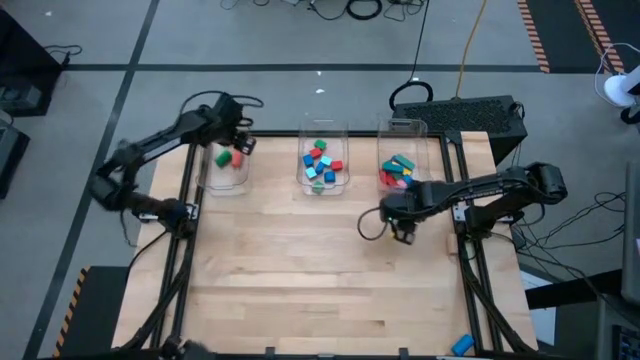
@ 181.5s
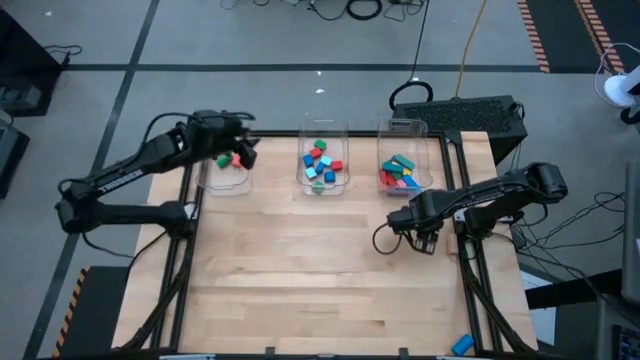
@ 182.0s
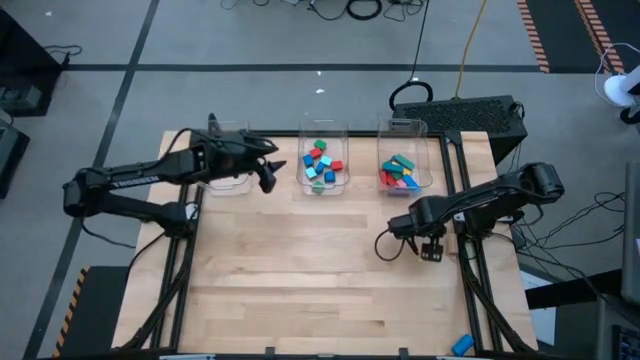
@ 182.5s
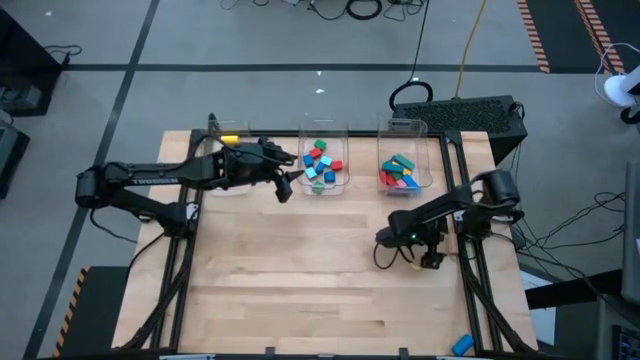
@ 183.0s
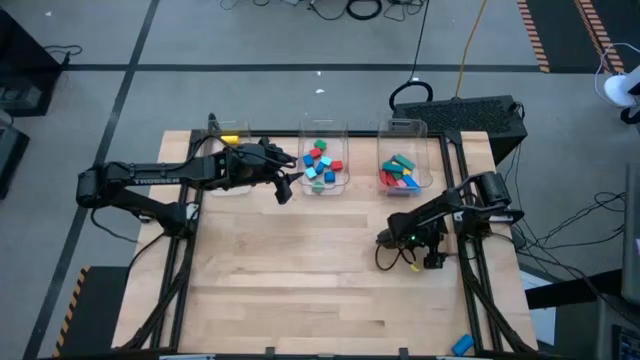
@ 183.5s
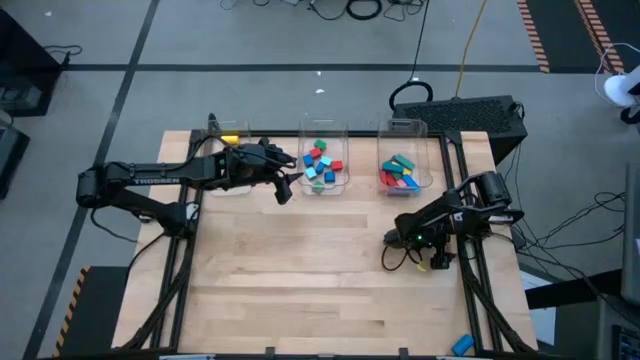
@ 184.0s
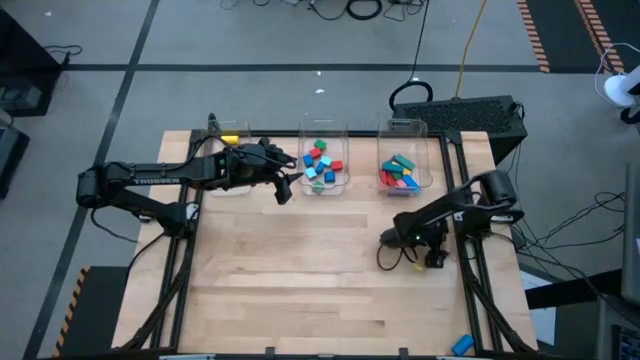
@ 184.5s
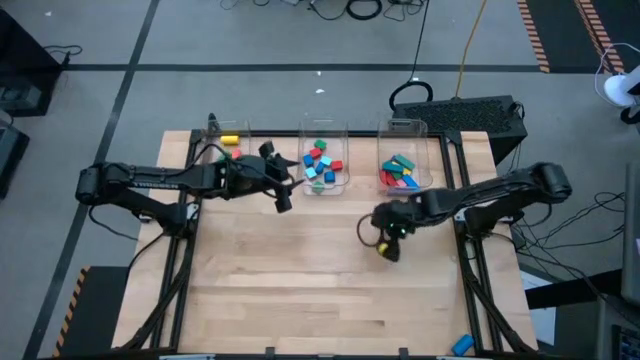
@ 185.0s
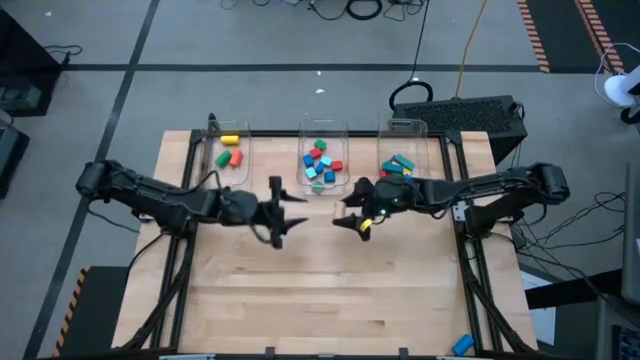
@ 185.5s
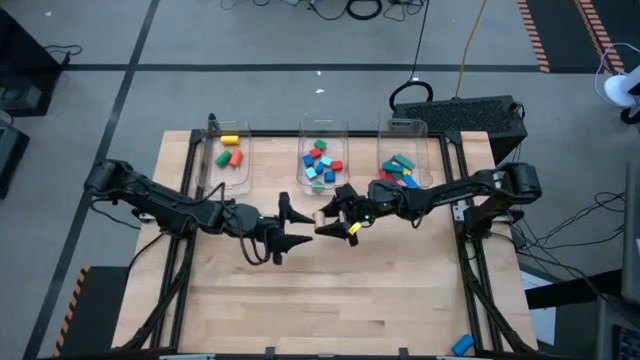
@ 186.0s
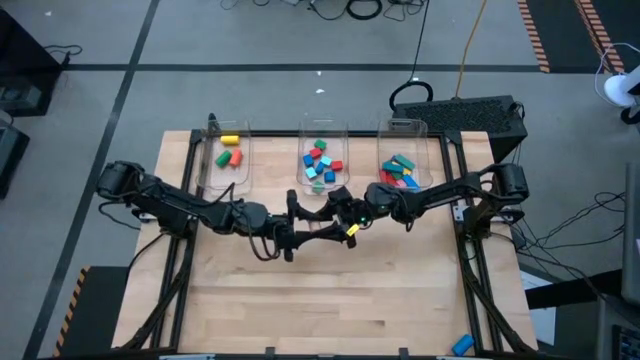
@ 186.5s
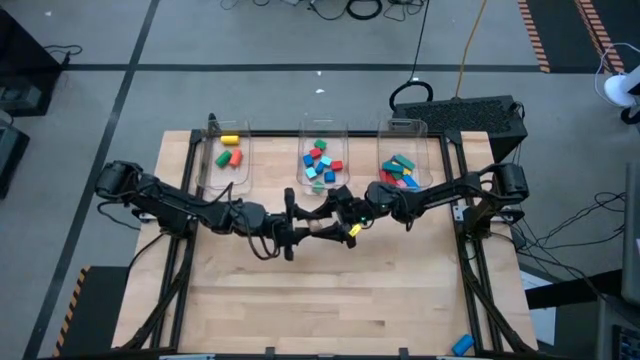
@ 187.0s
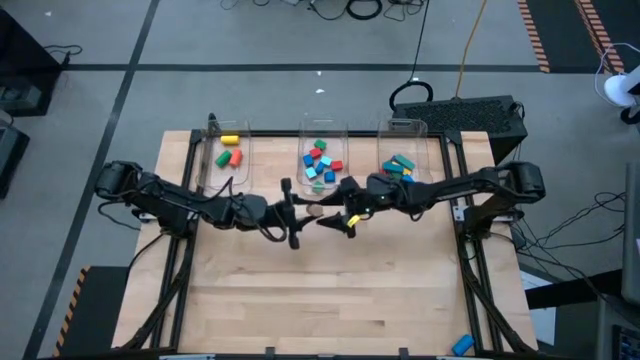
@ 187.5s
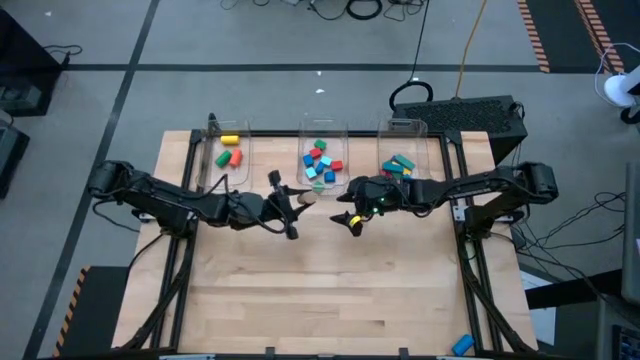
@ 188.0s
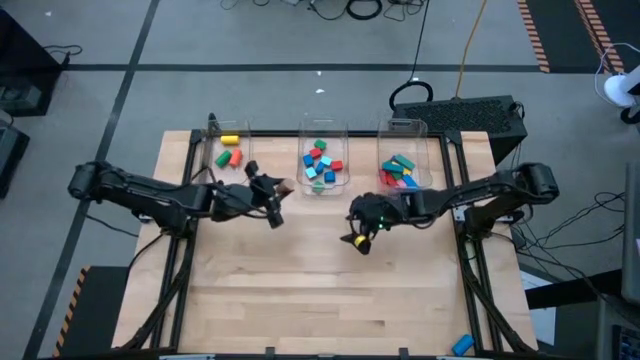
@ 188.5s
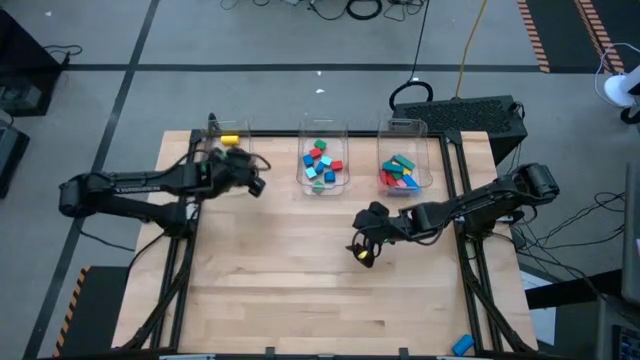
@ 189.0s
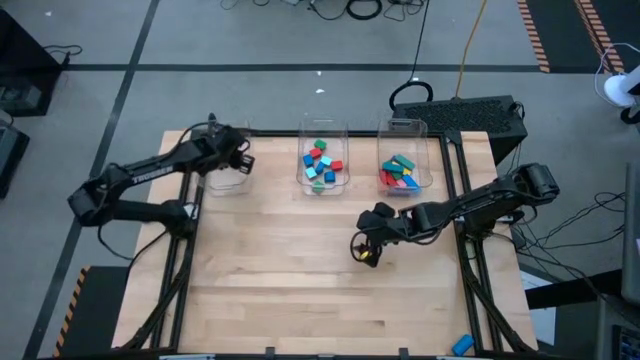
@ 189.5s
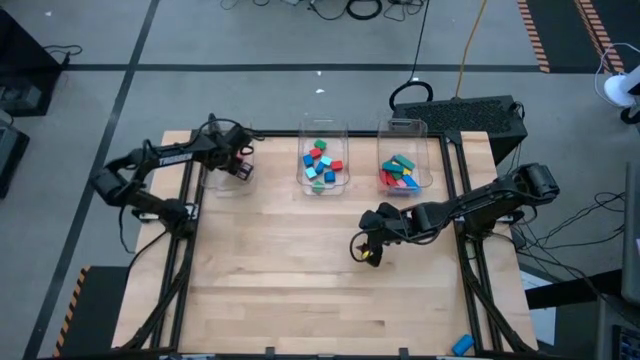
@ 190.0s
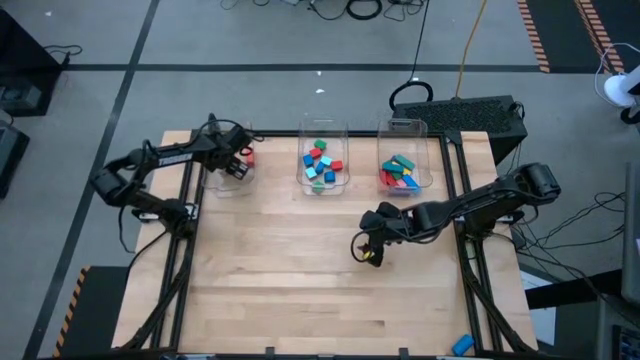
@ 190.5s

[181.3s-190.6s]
Task: Sort blocks by size
Put the brown cylindrical block into the left transparent bin

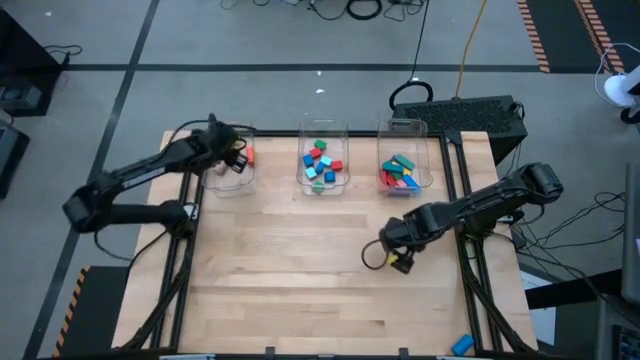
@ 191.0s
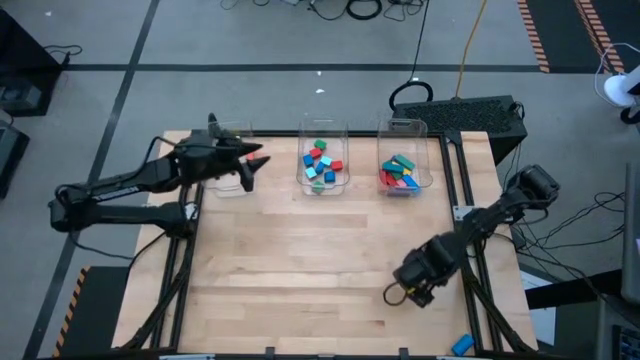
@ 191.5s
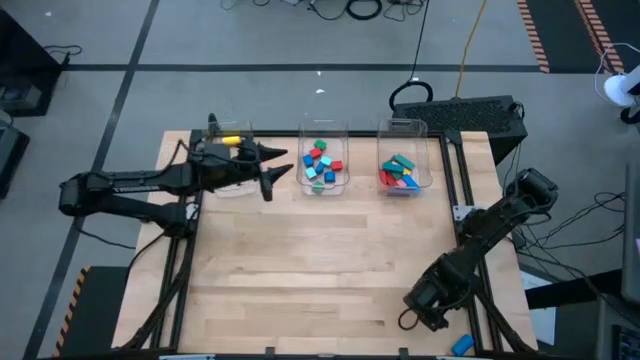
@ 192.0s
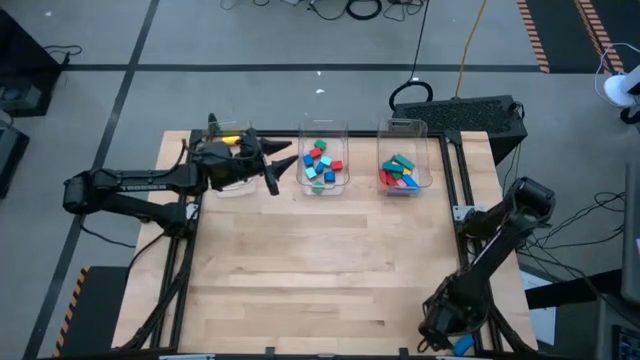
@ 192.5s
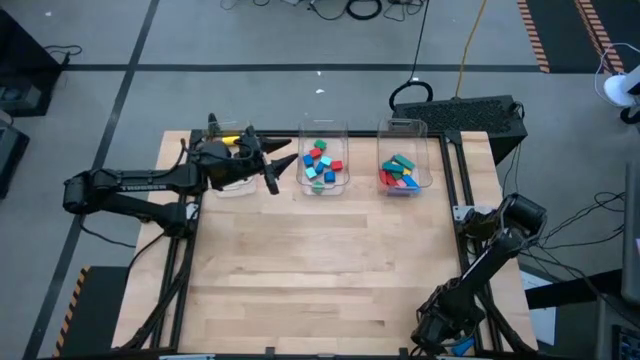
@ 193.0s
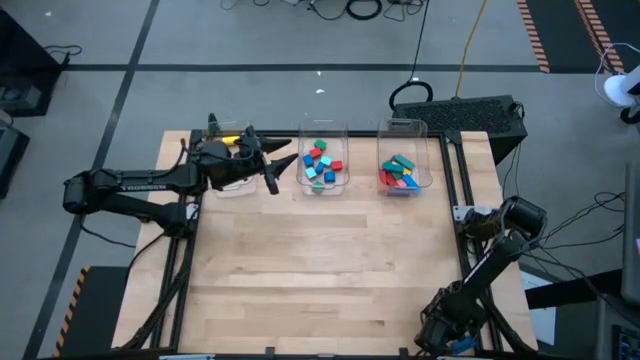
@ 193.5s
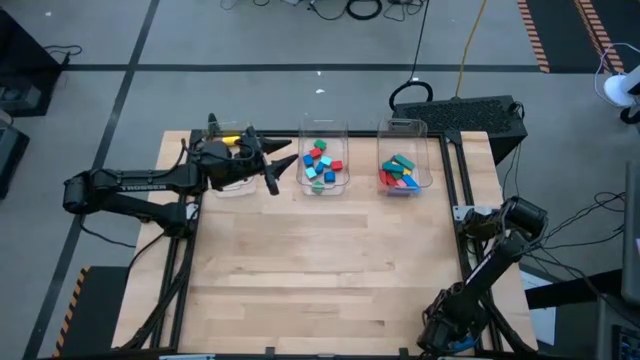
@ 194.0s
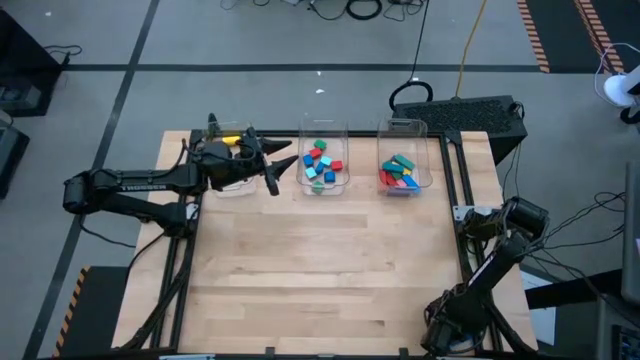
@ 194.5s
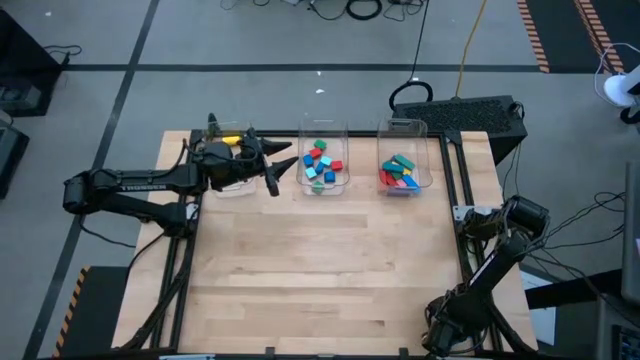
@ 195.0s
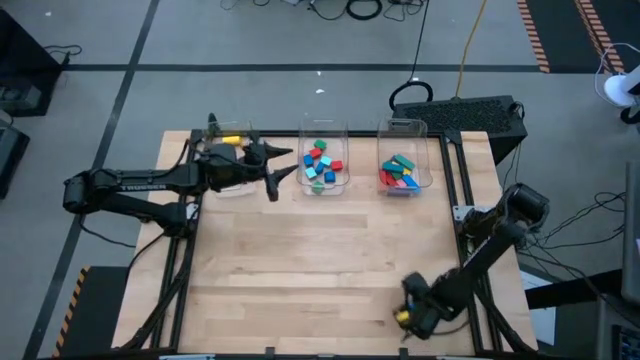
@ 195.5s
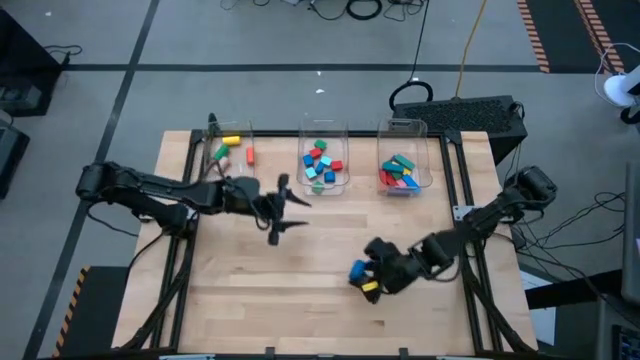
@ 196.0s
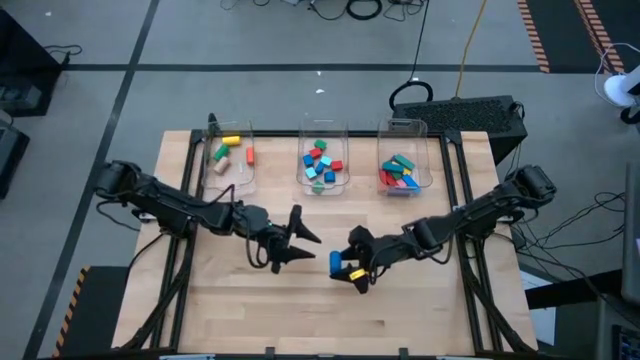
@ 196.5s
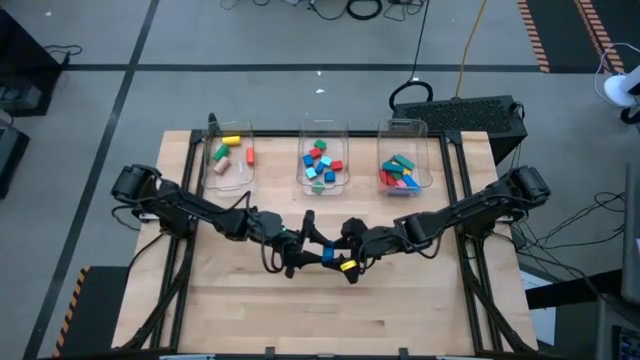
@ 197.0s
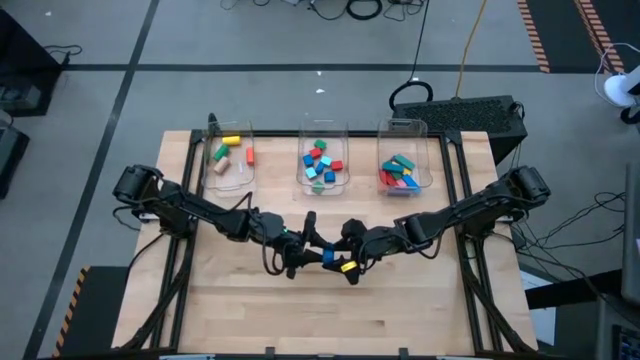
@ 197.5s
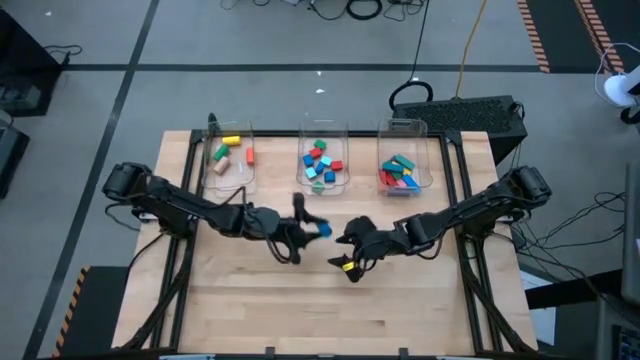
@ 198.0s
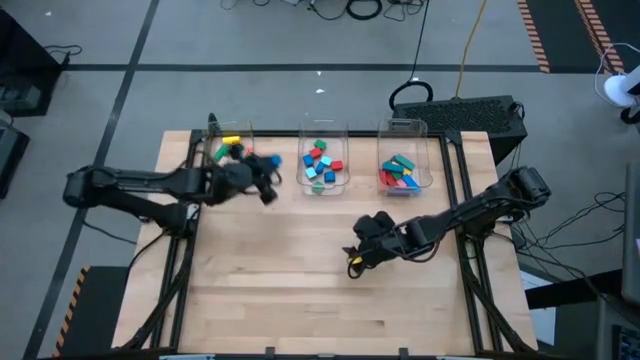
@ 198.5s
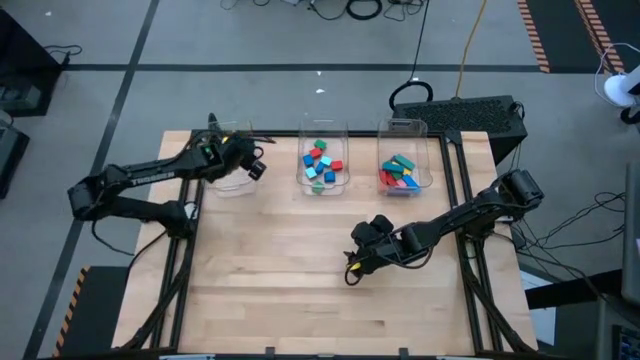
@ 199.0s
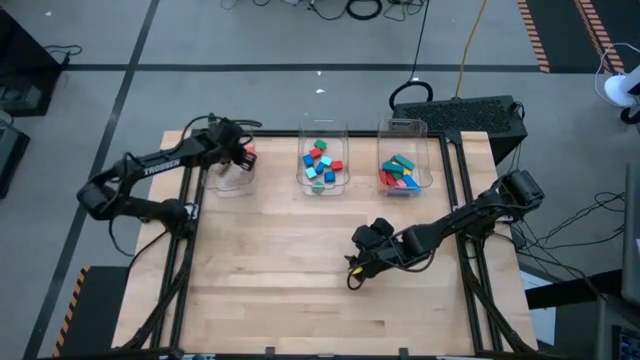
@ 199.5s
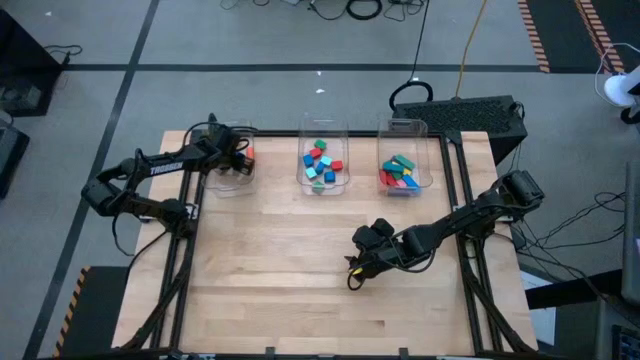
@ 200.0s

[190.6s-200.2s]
Put the blue cylindrical block into the left transparent bin

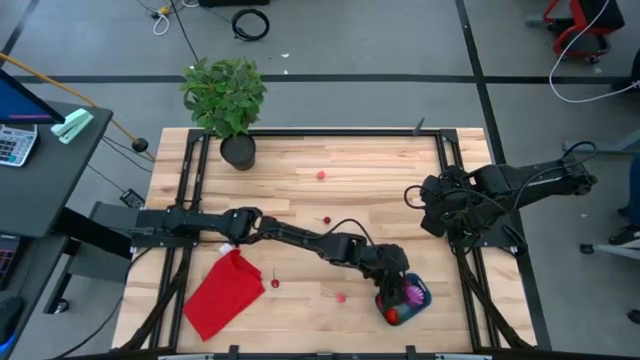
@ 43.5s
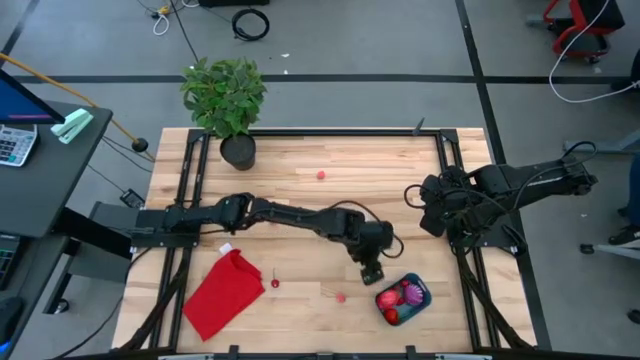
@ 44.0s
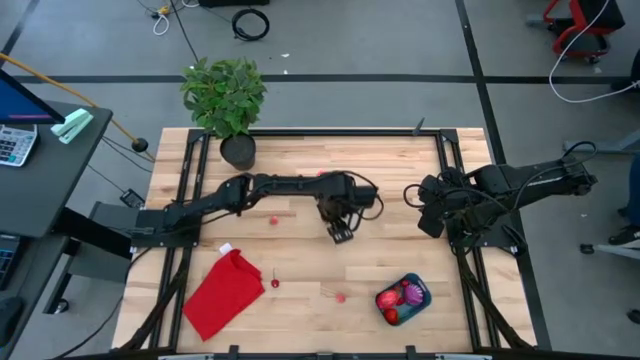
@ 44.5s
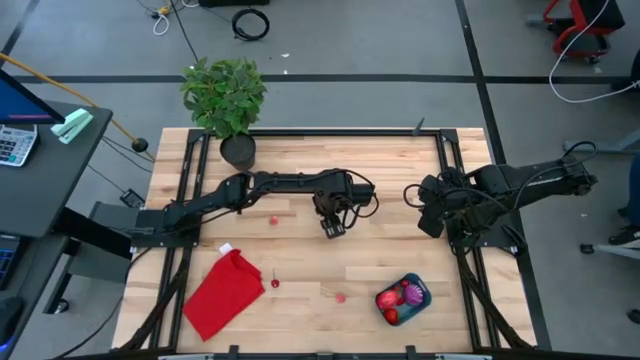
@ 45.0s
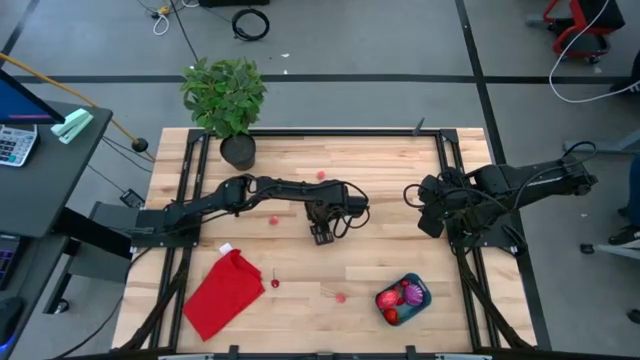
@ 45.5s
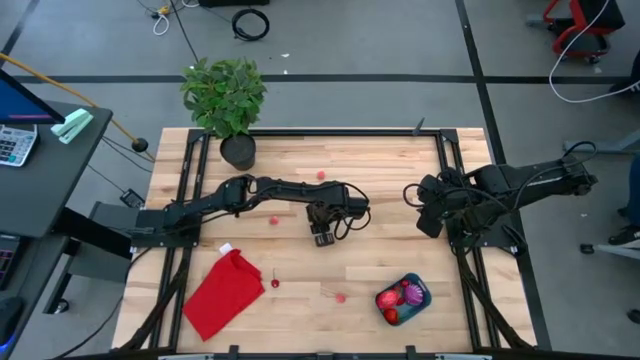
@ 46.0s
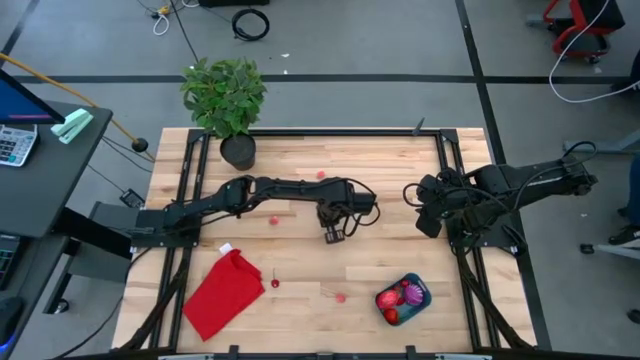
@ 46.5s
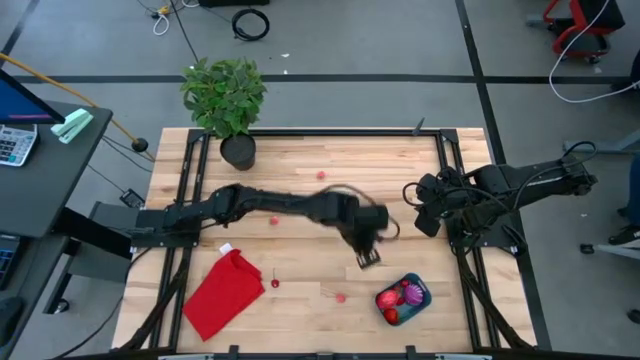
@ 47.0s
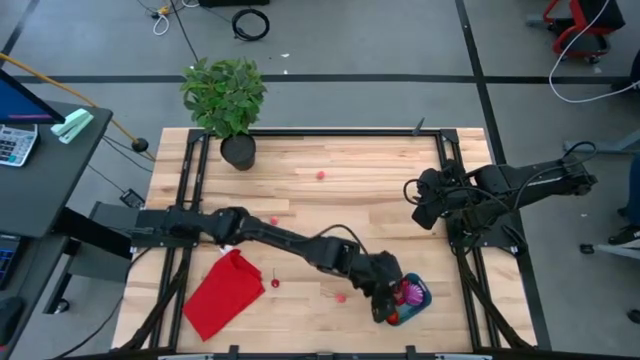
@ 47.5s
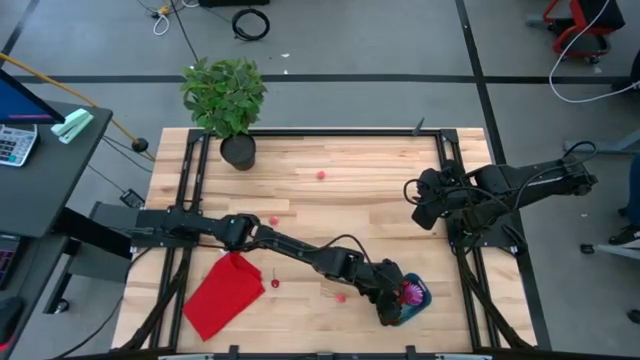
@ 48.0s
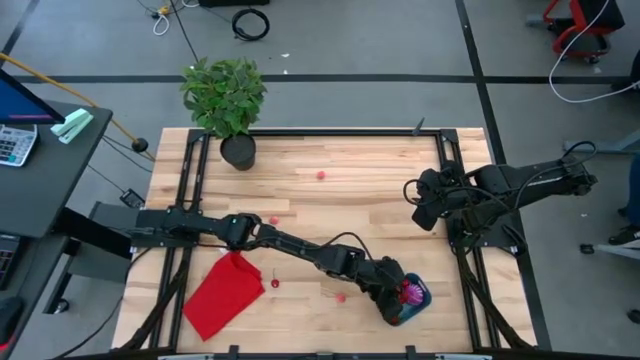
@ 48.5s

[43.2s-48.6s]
Task: Pick and placing Produce into tupperware
Put the top cherry into the bin
